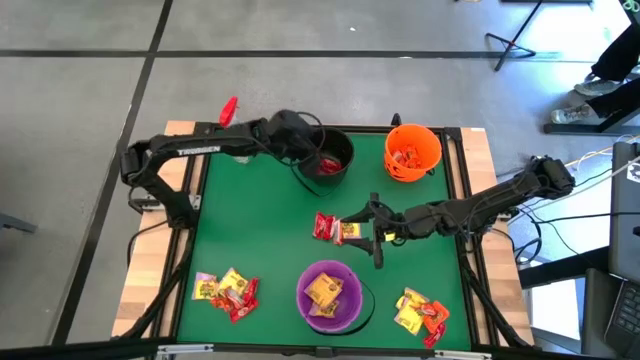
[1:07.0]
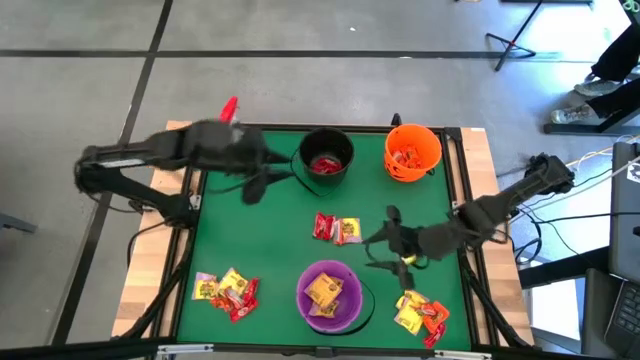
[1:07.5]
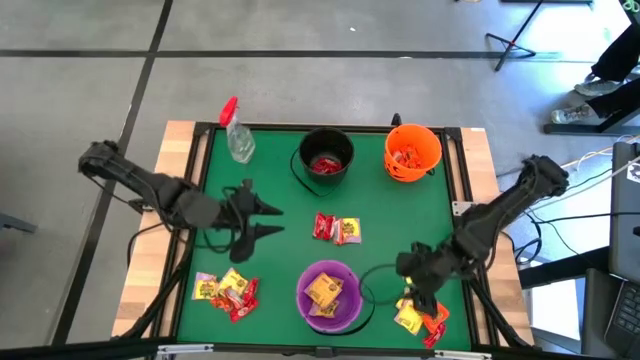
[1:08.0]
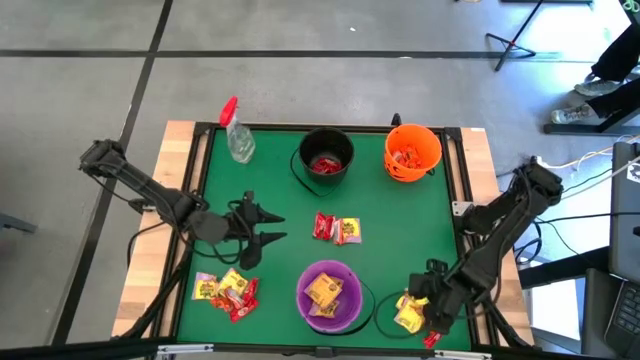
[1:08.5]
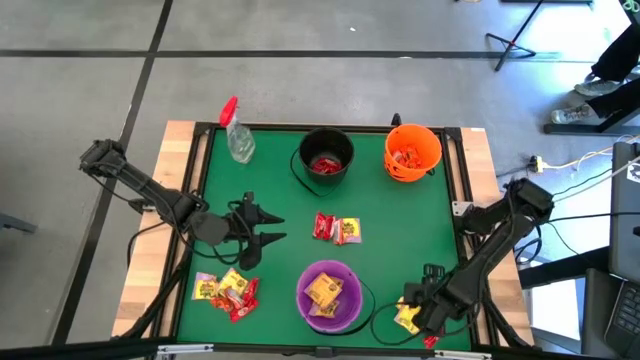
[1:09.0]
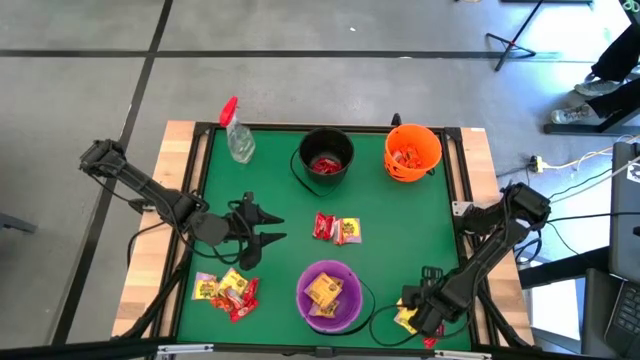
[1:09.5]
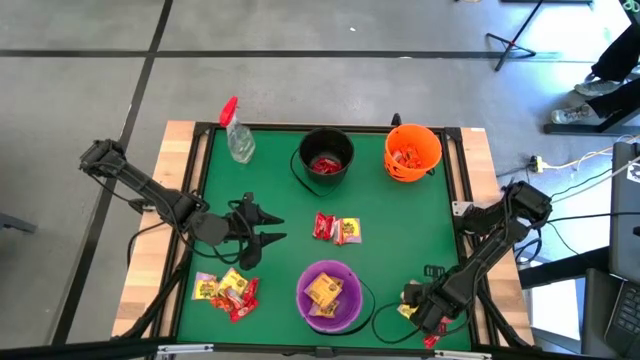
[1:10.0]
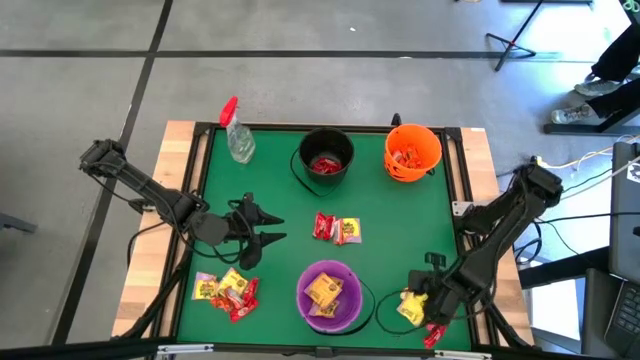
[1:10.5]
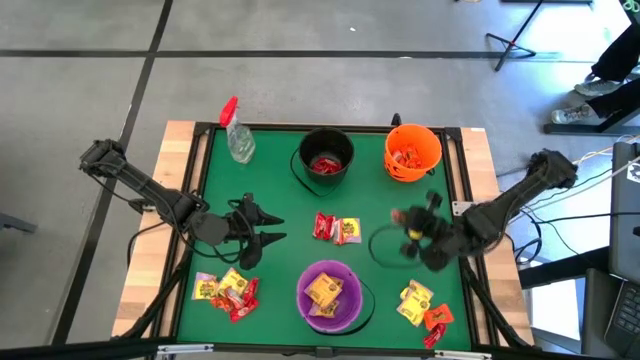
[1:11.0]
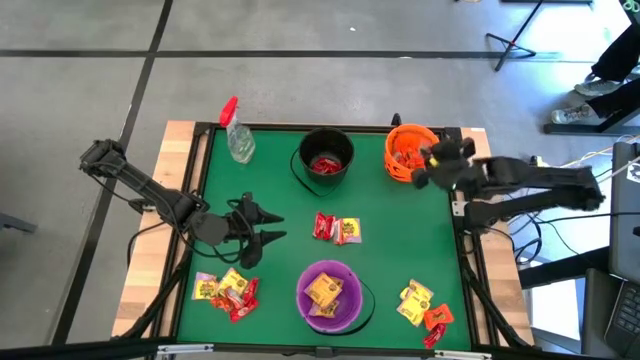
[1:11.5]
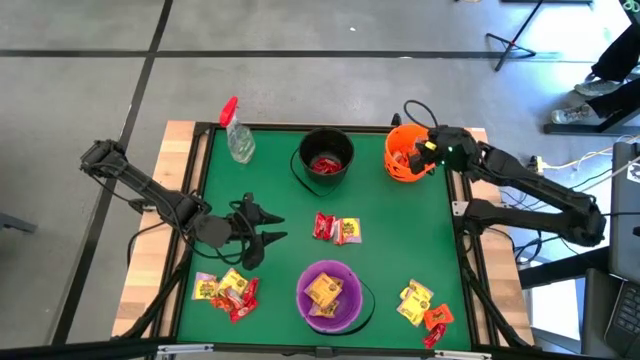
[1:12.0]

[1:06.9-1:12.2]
Task: Organize candy in baskets
Put the orange candy pack into the orange bucket

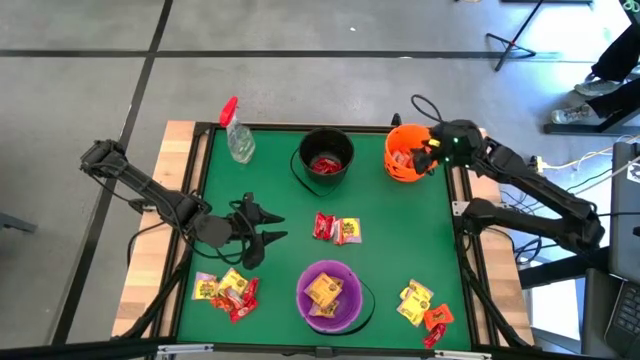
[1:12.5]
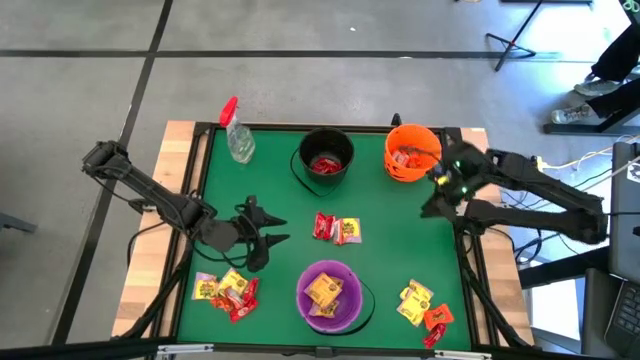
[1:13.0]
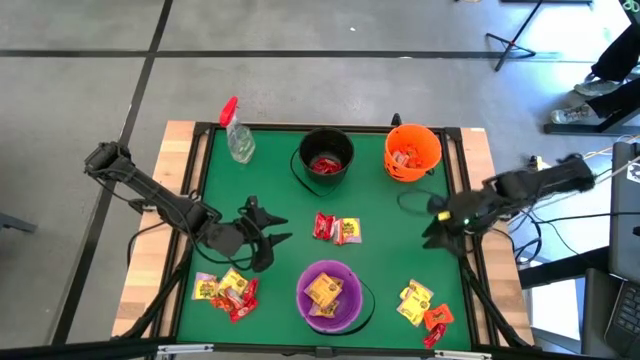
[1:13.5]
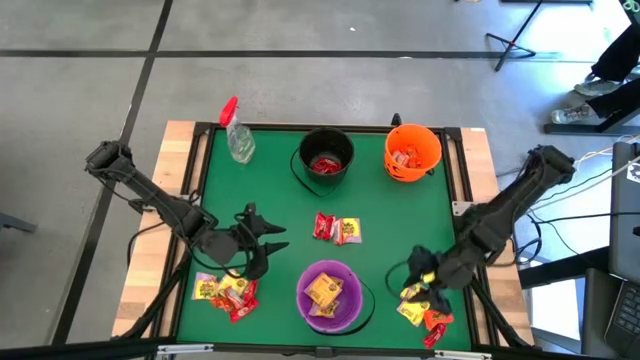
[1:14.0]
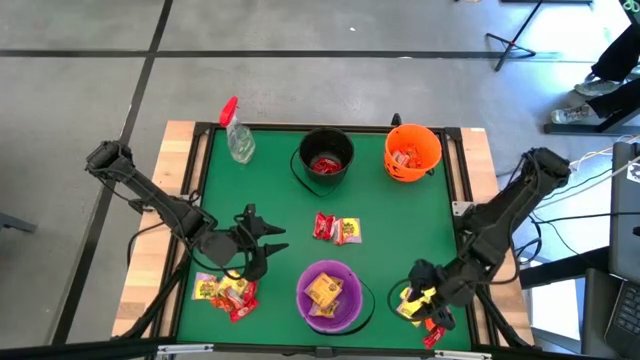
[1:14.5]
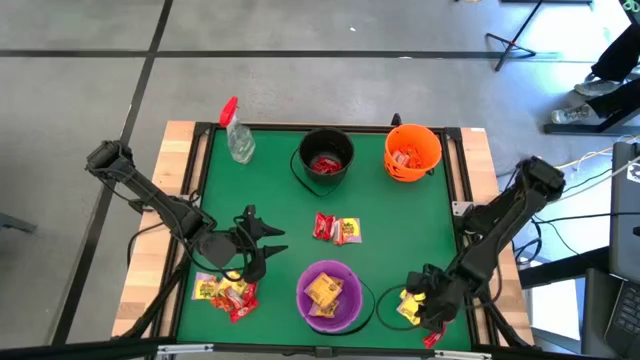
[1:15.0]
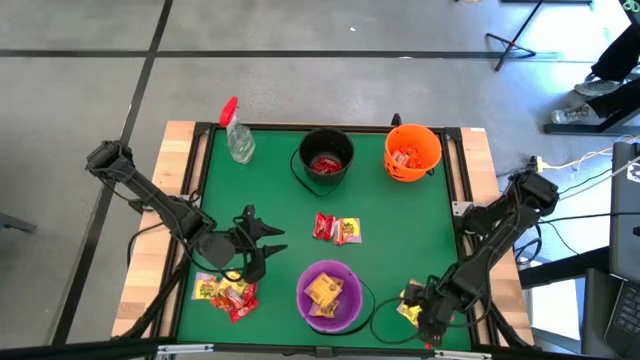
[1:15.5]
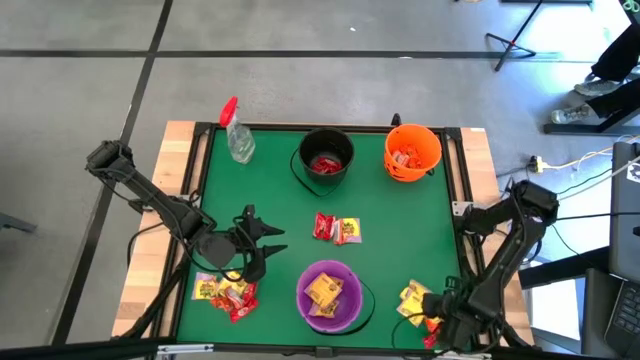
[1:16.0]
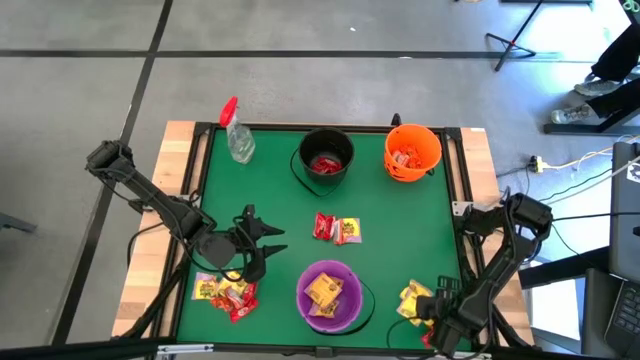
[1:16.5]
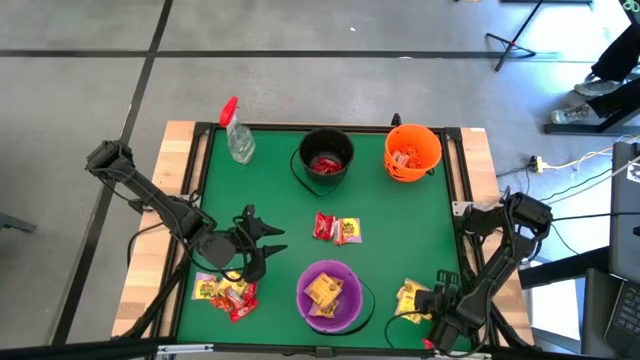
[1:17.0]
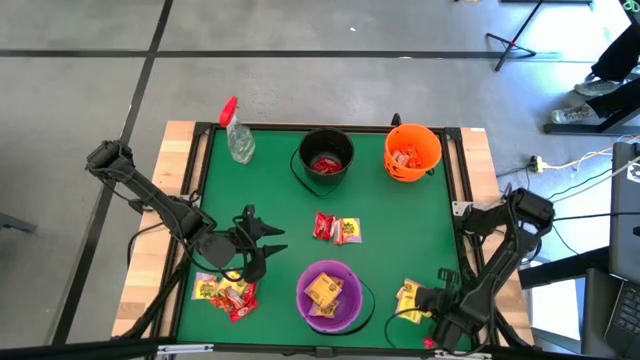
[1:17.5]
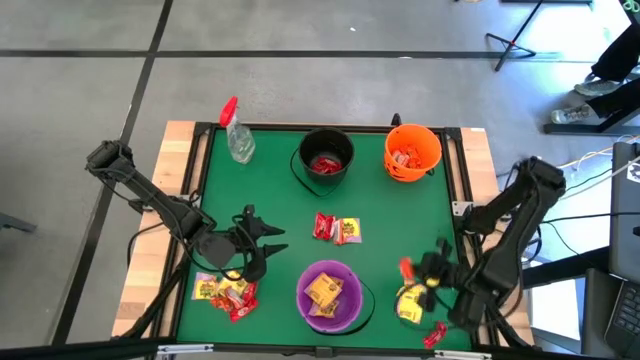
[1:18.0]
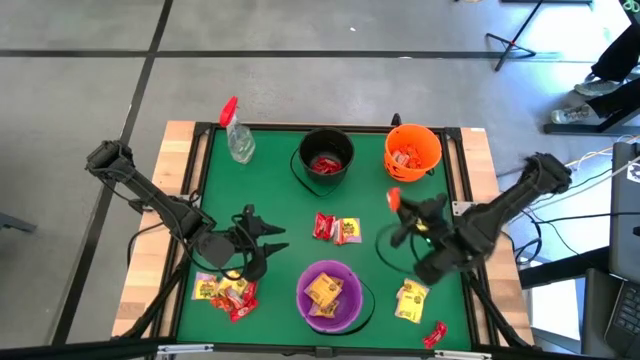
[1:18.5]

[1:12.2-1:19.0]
Put the orange candy pack into the orange bucket

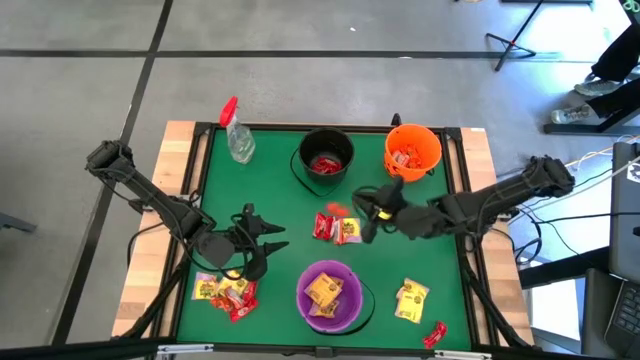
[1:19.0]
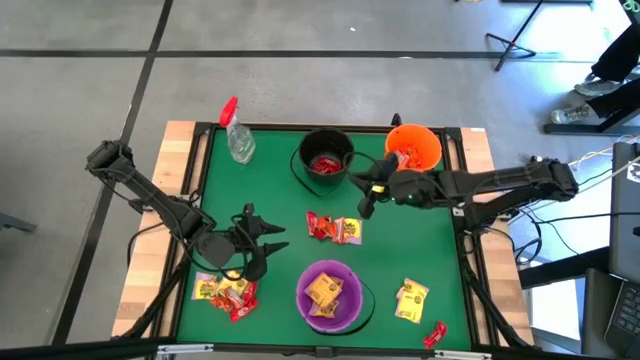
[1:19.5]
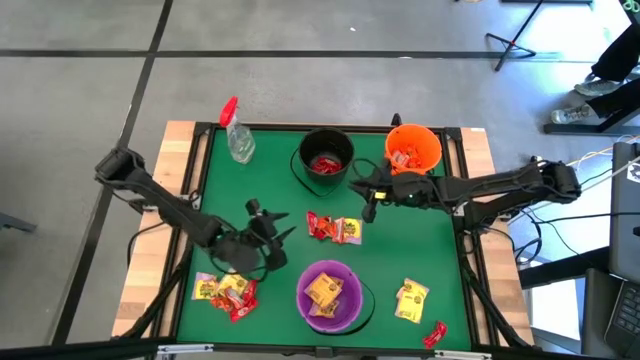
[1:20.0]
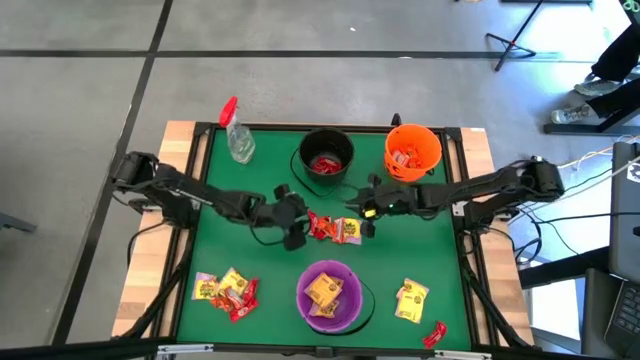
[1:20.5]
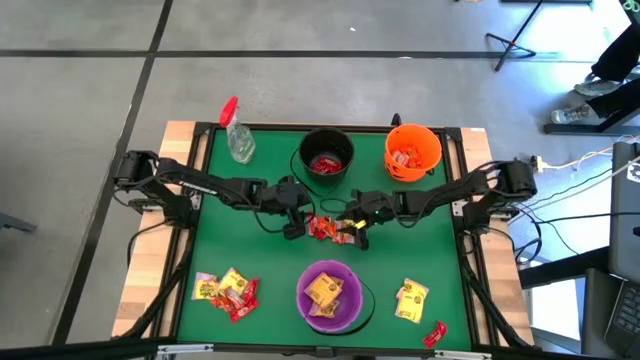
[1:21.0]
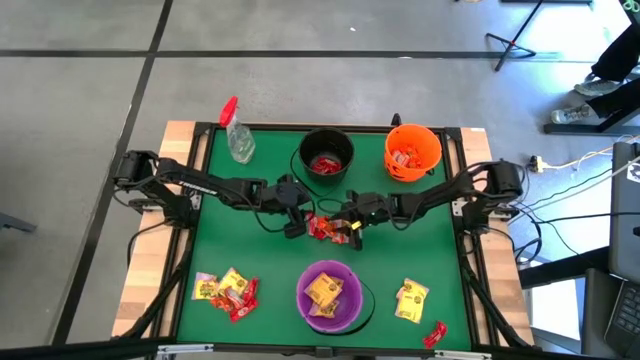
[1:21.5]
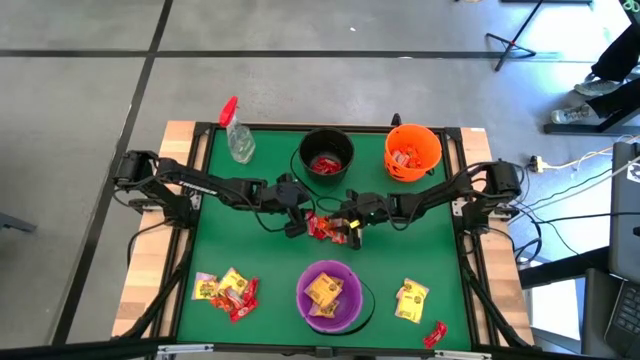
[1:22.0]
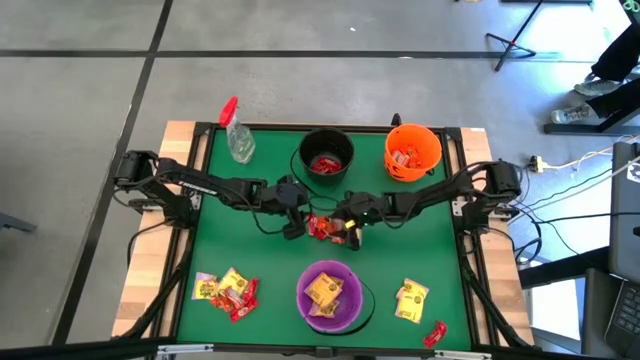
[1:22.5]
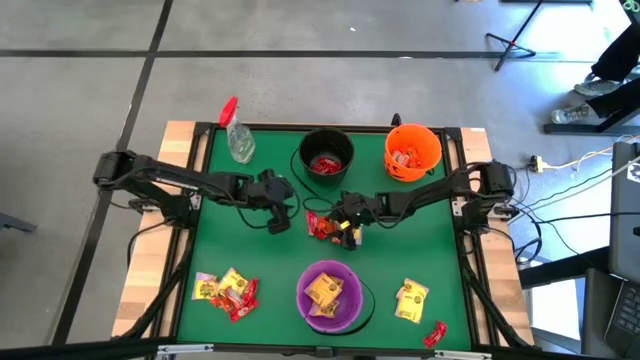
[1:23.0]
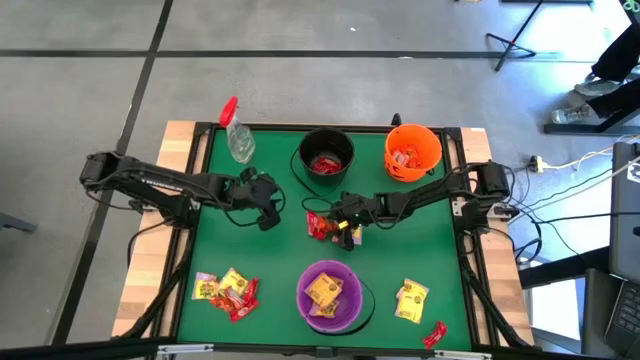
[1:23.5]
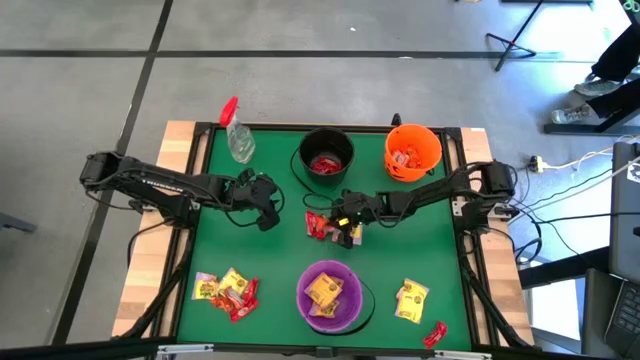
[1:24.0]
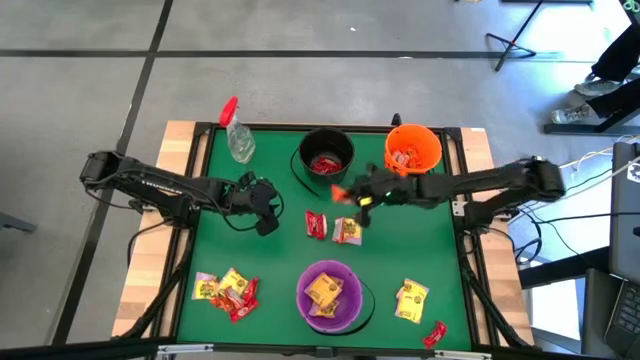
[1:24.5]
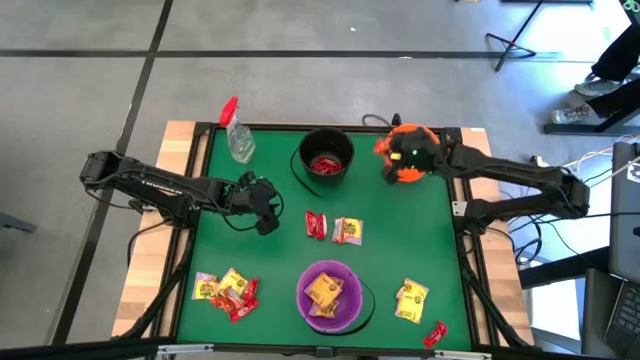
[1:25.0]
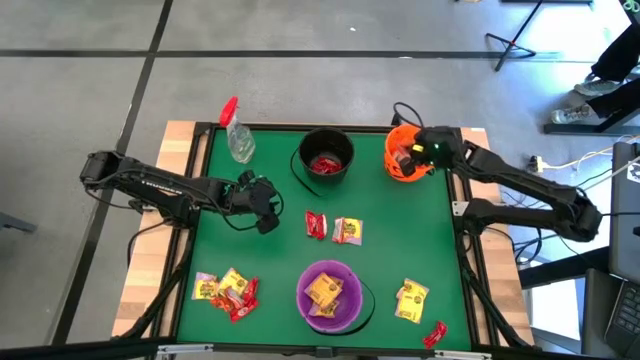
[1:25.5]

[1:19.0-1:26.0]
Put the orange candy pack into the orange bucket

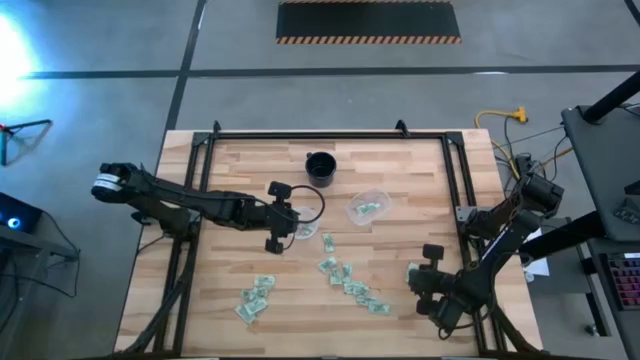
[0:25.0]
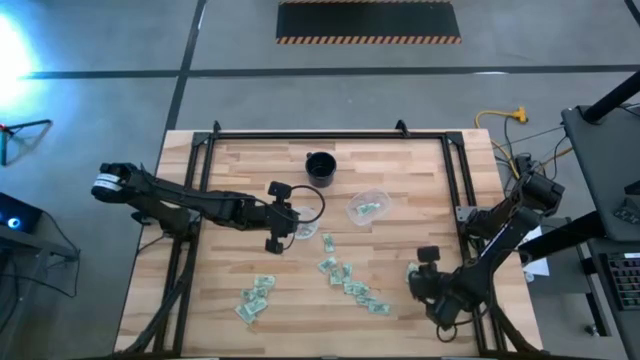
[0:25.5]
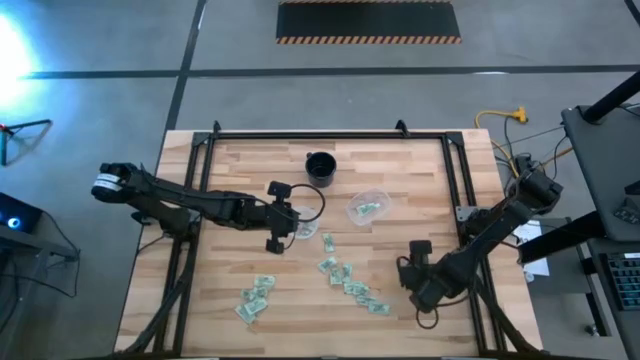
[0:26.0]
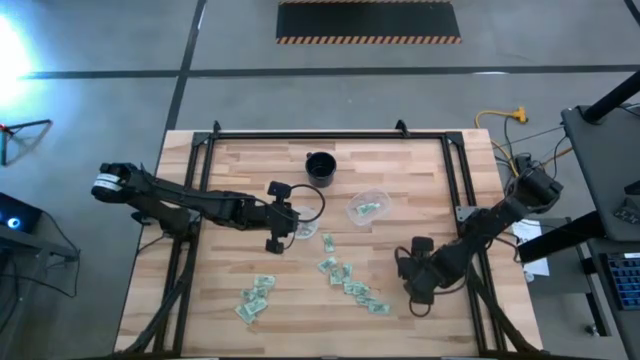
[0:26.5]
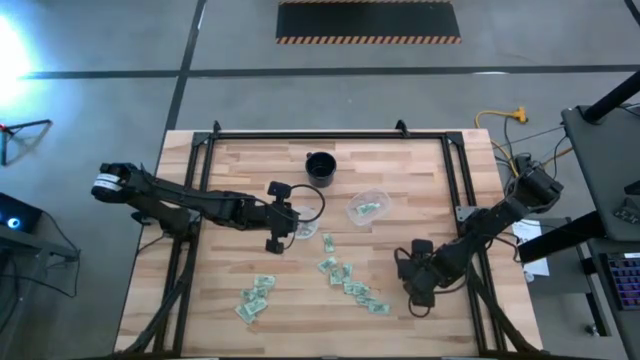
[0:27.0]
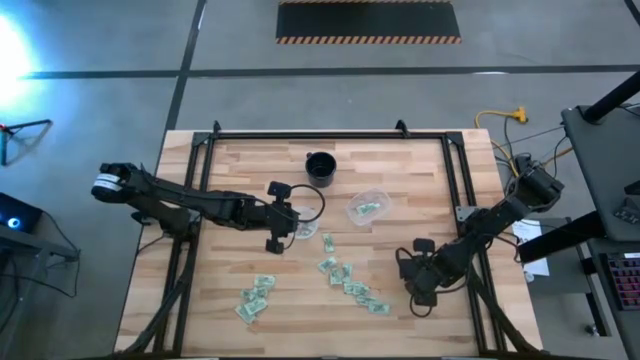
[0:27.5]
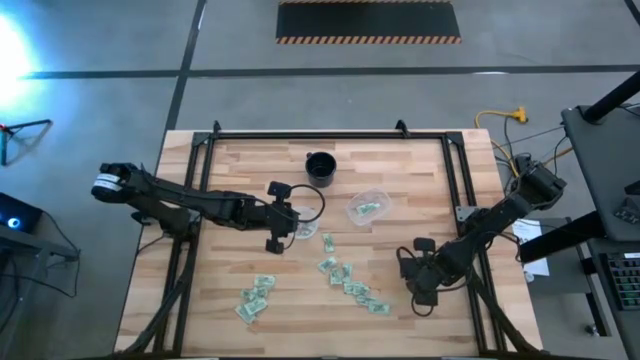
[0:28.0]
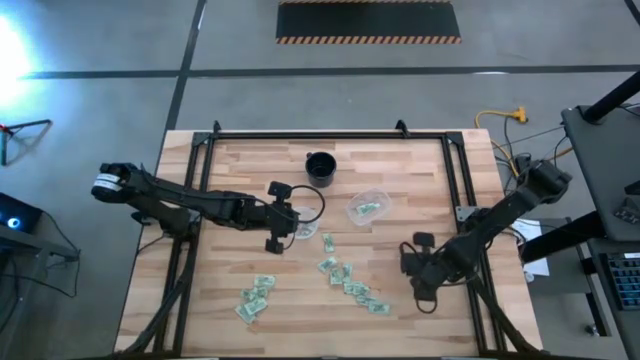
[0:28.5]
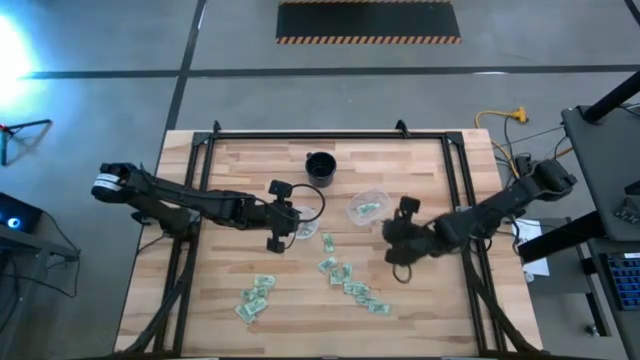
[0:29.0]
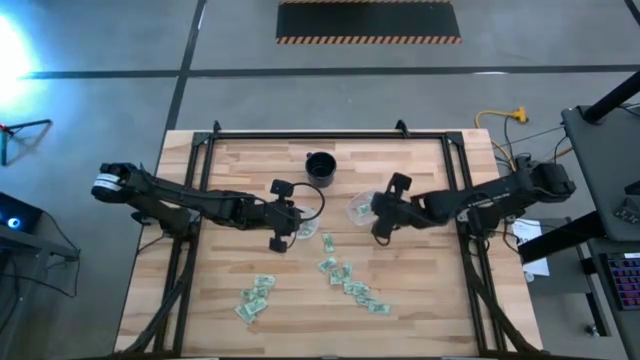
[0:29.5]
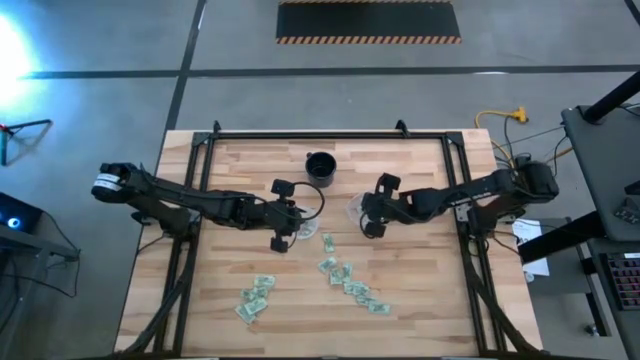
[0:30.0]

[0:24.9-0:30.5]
Task: Pick and place Stevia / Truvia into bins
Put the green stevia packet into the right transparent container
